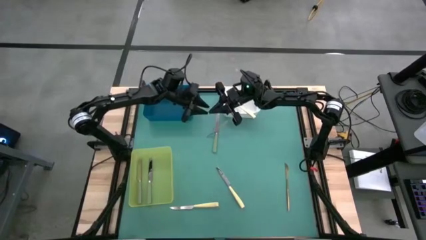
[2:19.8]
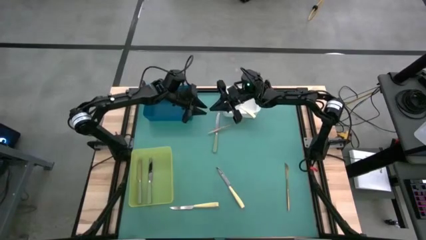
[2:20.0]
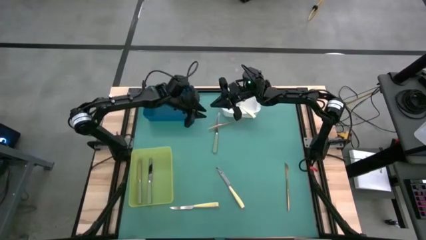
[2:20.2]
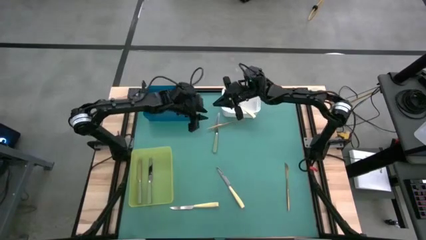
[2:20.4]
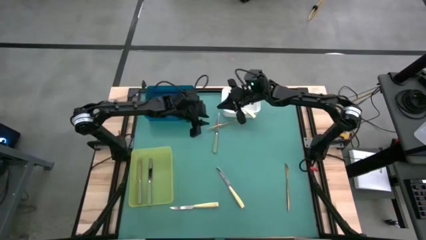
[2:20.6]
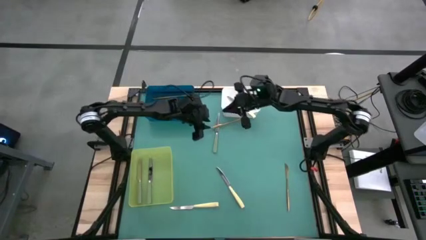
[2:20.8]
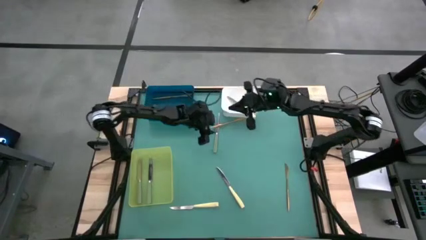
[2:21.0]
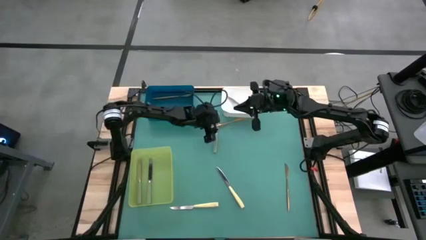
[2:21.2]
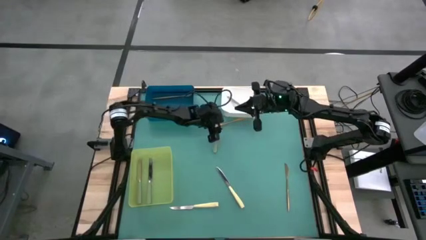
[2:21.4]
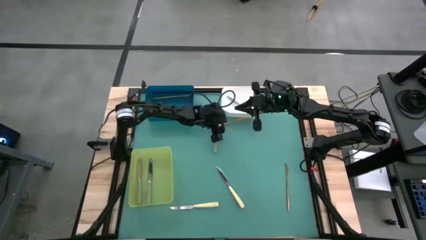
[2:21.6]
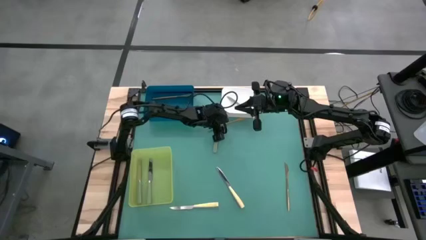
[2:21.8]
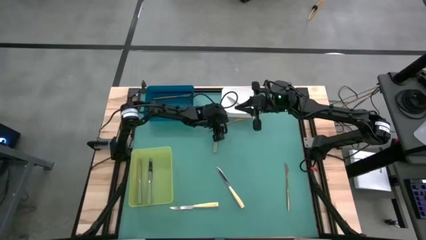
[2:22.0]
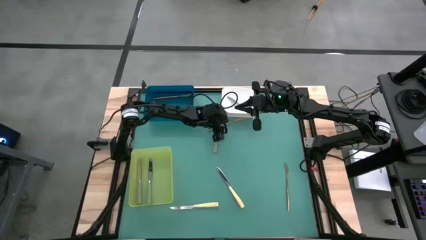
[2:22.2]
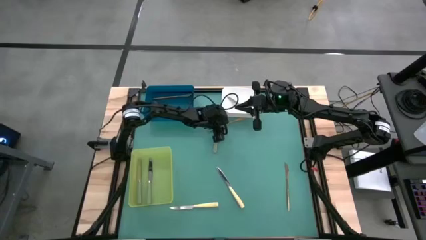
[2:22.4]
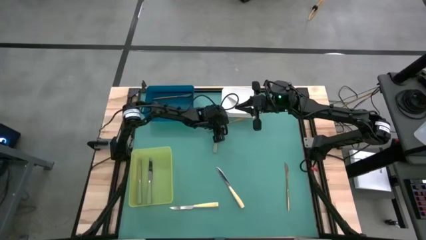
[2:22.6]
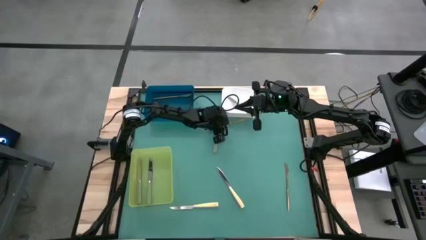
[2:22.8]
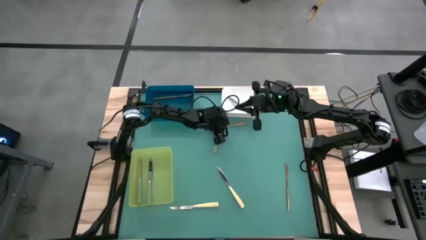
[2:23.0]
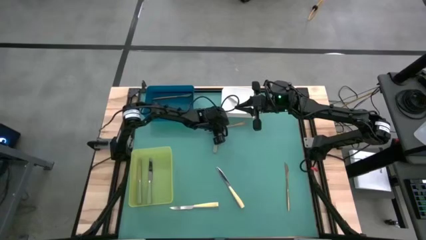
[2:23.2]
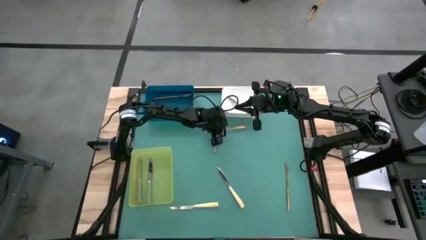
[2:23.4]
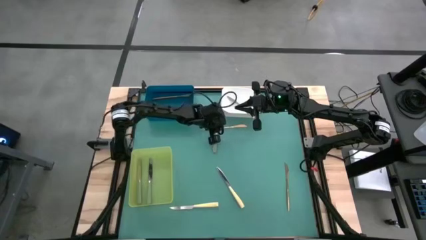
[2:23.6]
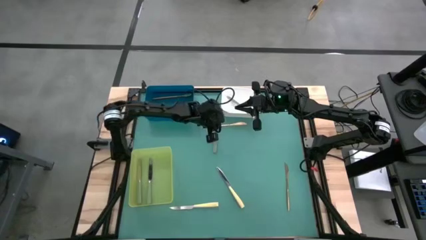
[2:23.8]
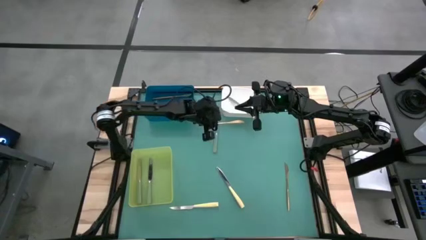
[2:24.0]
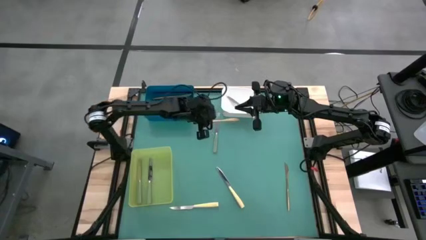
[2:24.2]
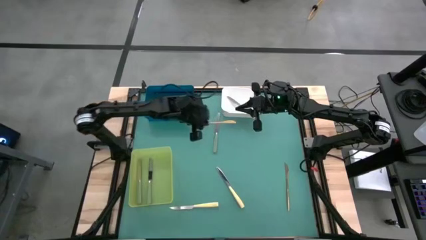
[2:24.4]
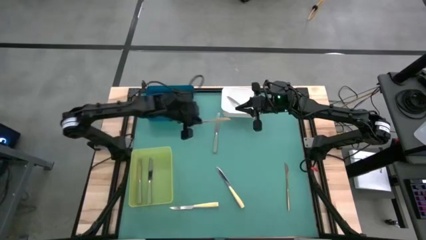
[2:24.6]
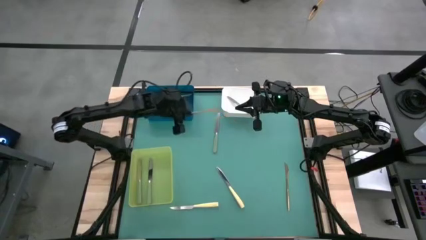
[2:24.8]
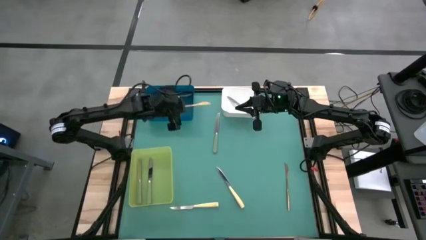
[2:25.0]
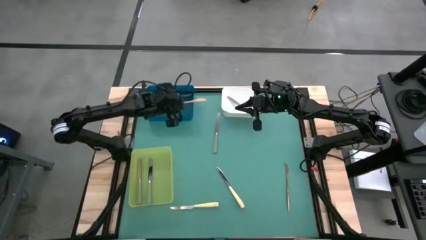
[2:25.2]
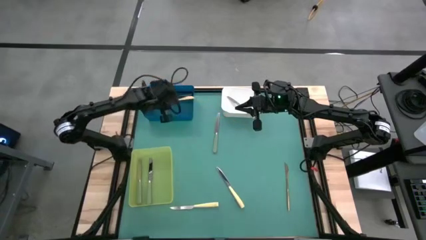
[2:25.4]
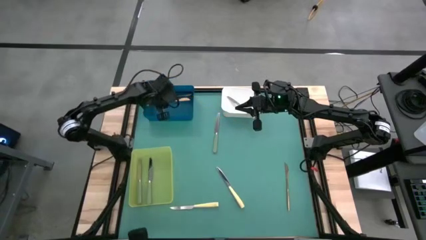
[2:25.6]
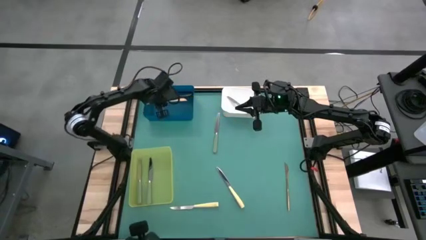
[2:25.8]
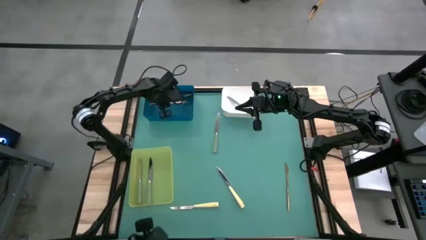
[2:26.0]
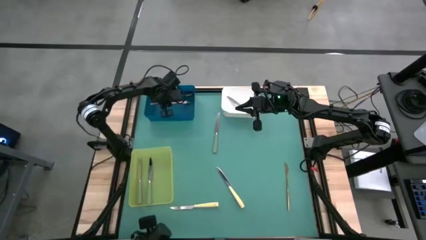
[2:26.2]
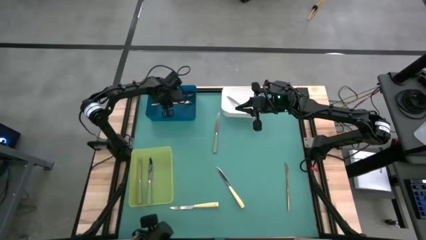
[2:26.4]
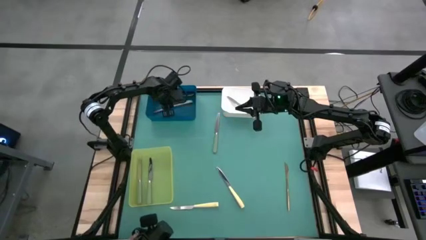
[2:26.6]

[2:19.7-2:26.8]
Task: Sort silverware by color (type)
Put the left gold knife into the blue bin

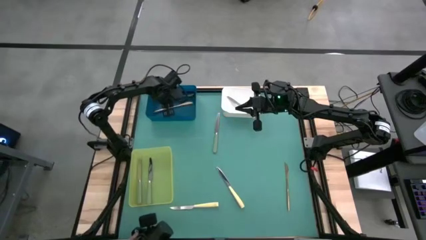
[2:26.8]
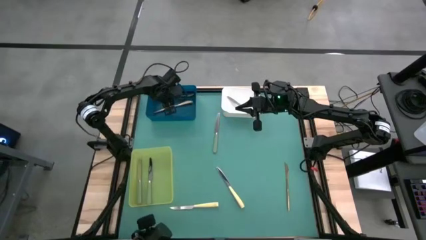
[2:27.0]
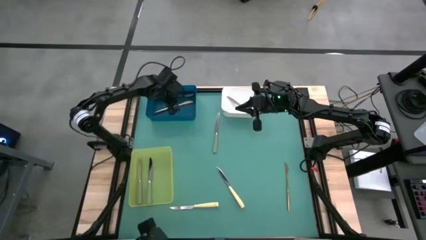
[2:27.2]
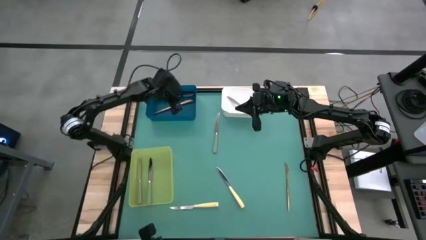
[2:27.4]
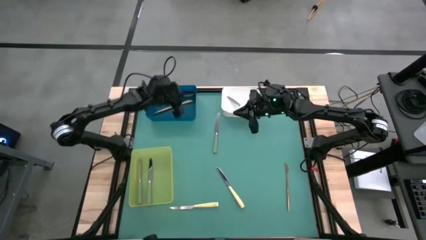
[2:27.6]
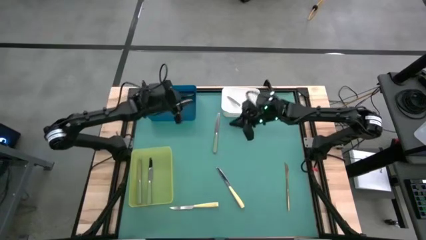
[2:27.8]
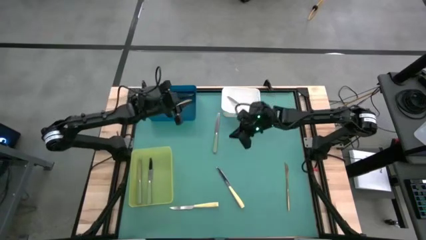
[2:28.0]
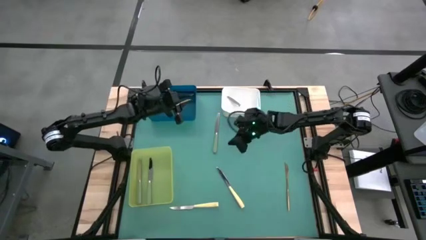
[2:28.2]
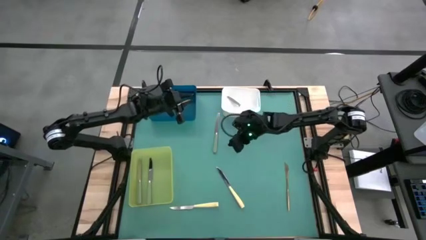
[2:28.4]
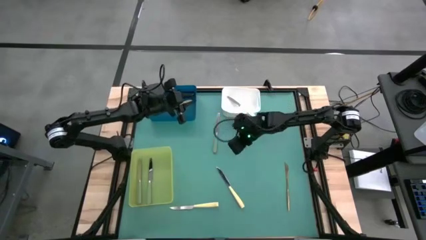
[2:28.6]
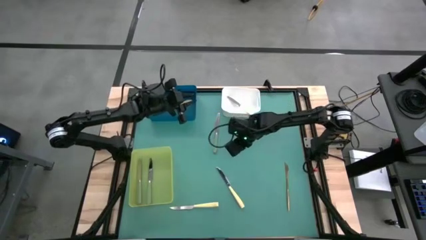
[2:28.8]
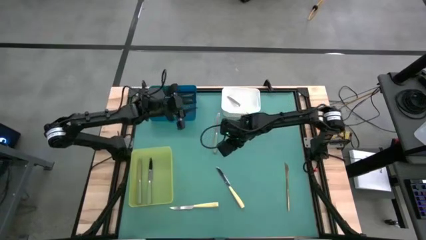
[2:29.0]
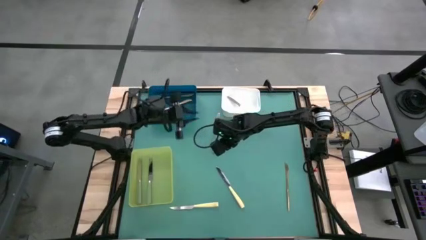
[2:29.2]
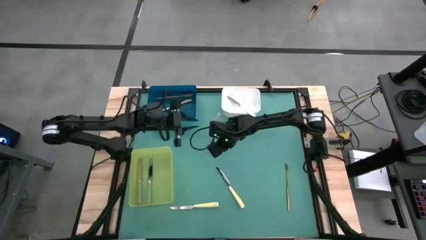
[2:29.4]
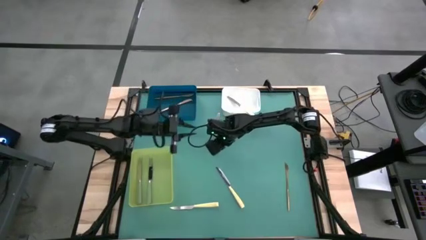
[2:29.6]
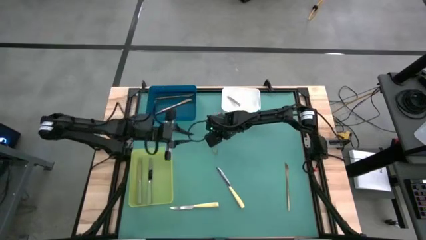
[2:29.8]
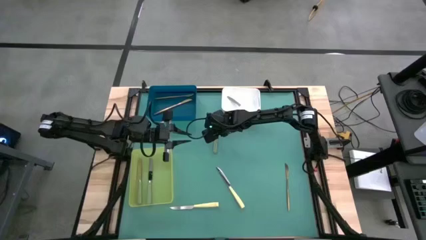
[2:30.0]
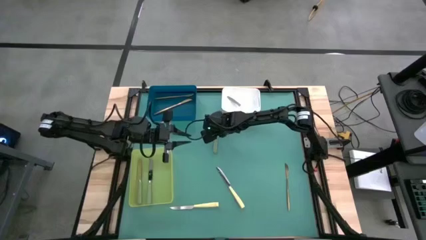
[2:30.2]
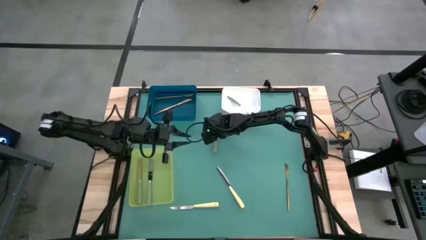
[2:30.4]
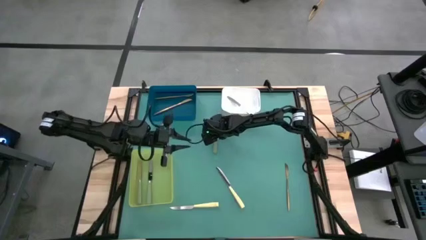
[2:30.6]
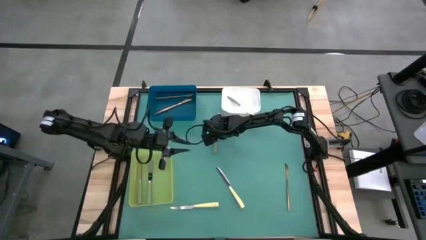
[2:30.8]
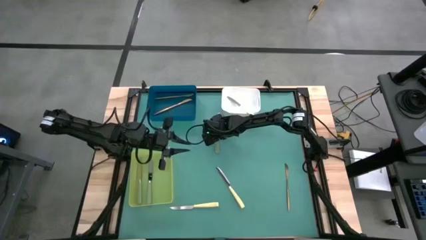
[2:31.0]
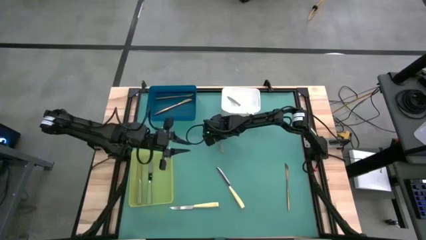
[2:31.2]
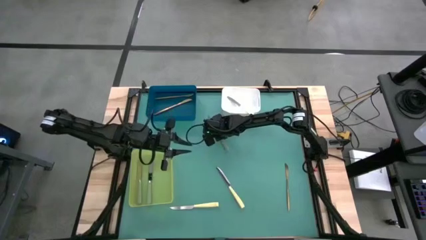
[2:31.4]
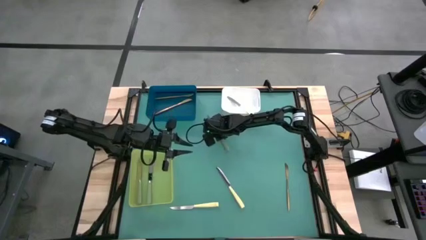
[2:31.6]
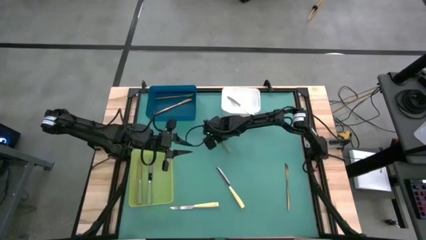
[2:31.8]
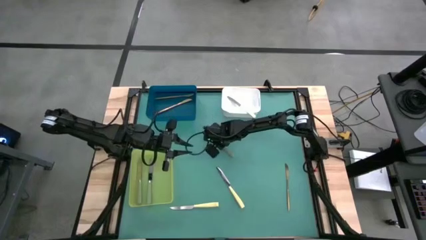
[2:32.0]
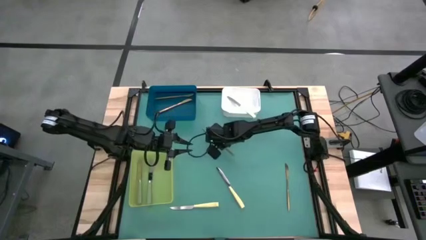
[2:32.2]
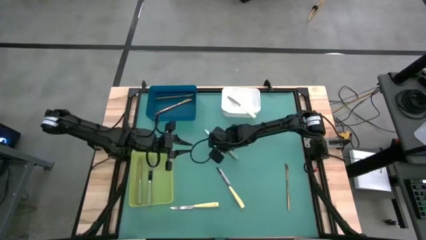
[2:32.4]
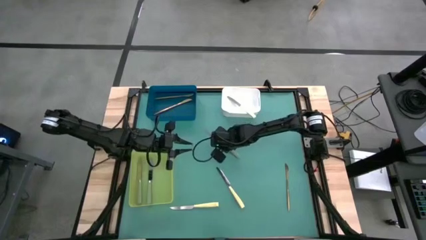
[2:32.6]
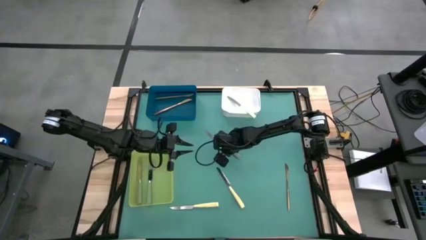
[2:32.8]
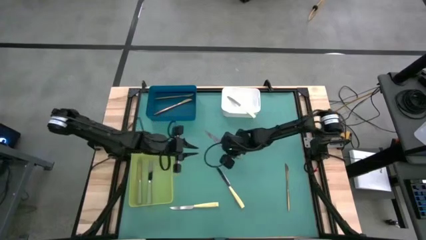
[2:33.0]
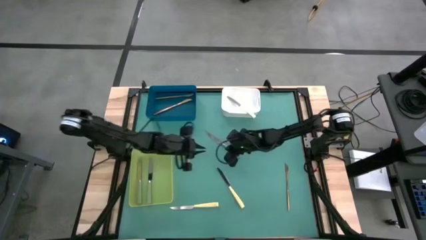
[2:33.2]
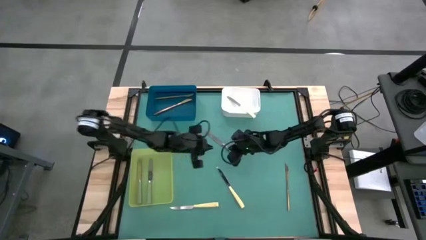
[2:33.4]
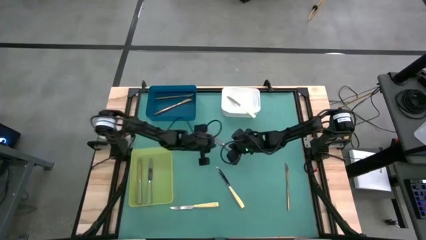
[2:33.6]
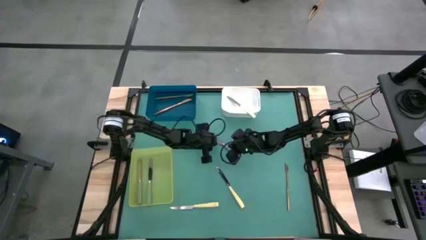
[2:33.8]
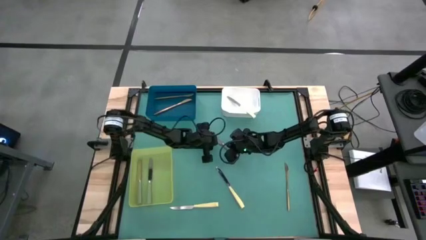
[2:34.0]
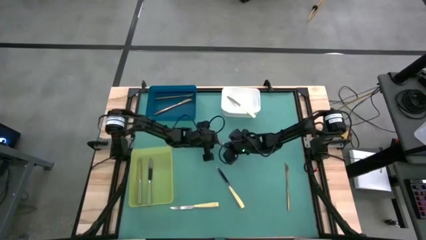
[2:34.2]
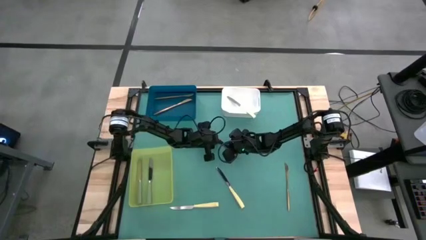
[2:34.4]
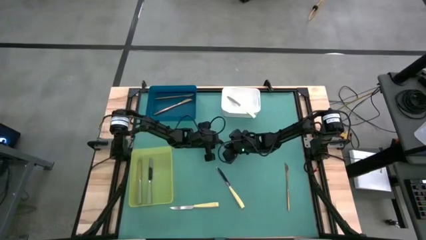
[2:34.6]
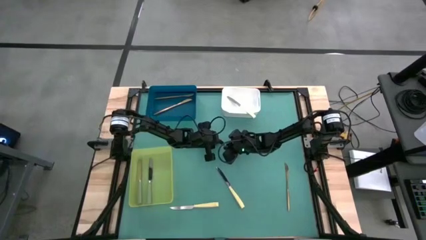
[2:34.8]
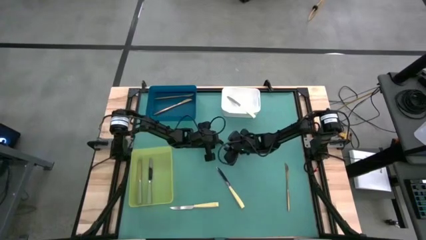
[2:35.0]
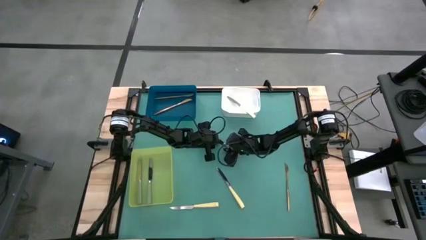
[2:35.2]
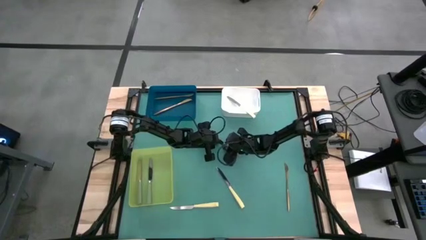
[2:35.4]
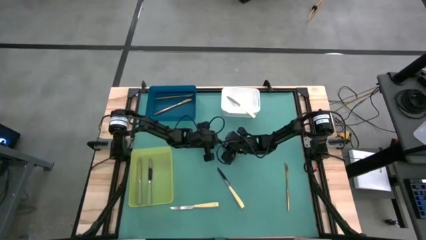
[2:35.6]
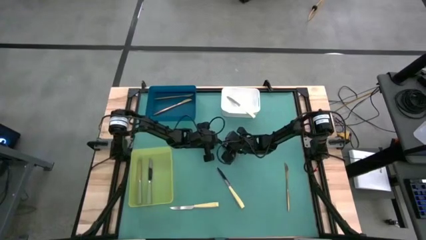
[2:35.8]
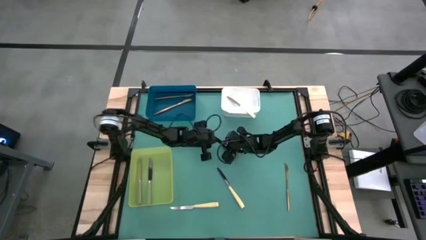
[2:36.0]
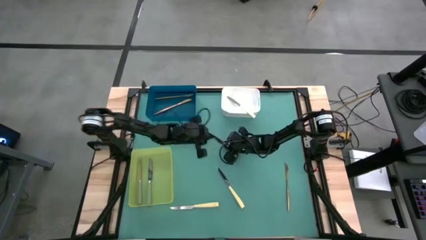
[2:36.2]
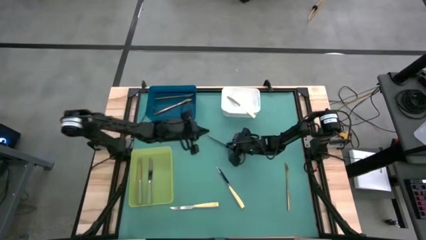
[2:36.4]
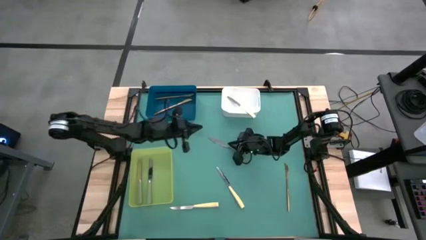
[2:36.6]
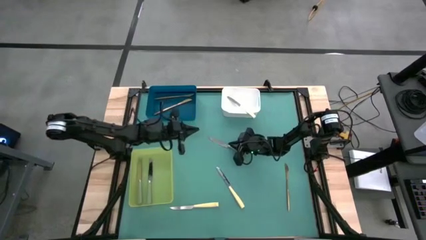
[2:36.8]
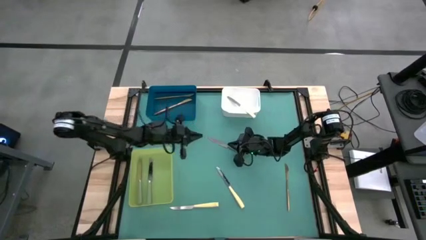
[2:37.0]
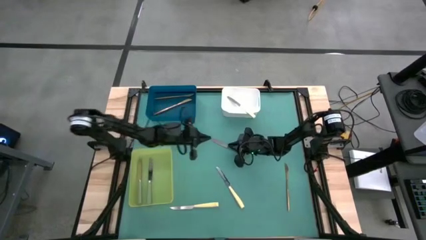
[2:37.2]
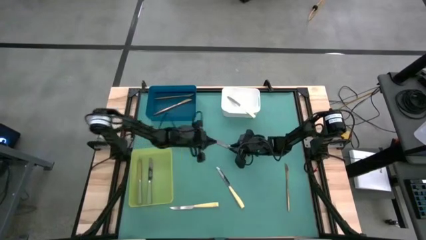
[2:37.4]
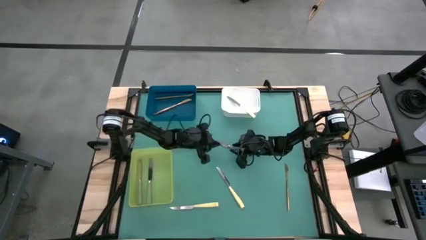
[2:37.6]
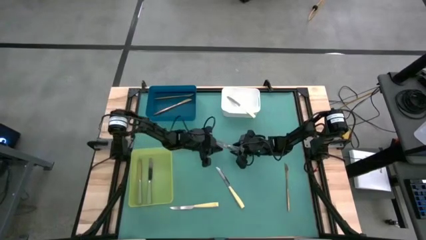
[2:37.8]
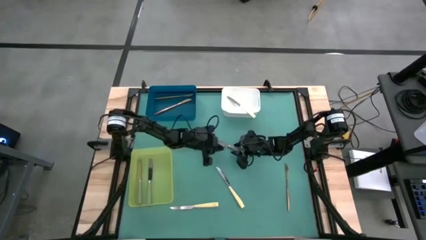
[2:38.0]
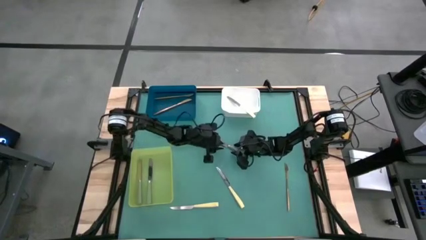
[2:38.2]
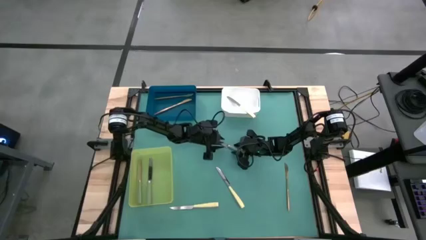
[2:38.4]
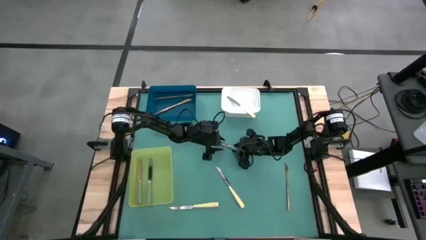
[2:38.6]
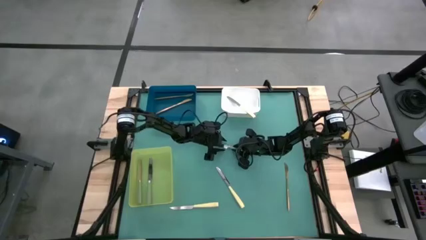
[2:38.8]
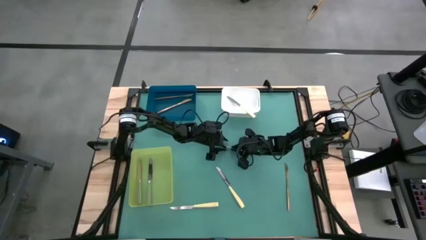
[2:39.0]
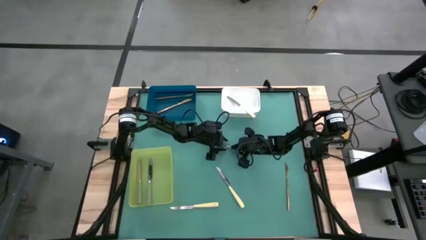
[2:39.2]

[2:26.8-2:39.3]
Put the green knife into the green bin
